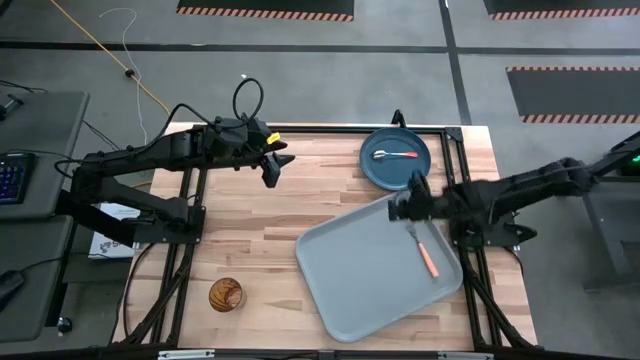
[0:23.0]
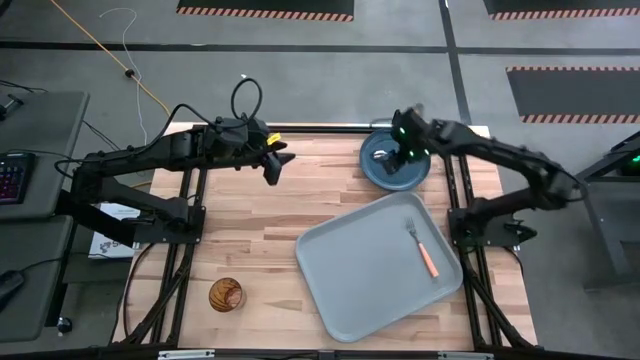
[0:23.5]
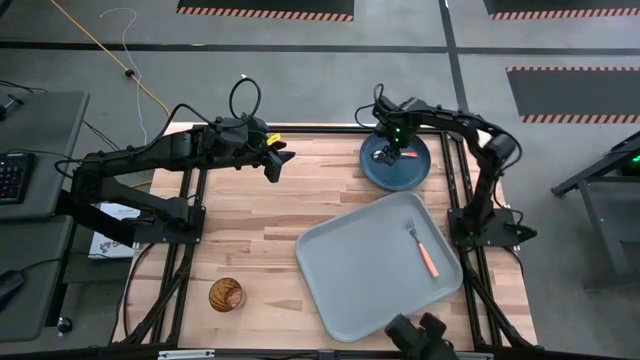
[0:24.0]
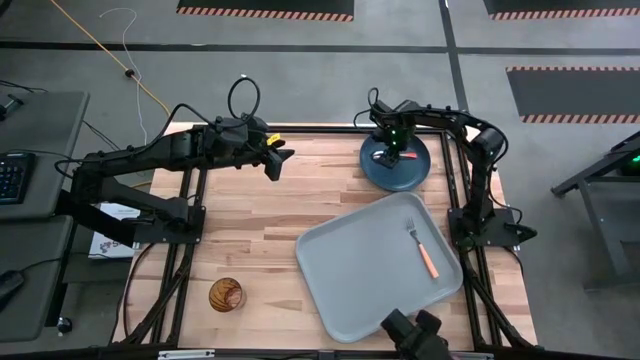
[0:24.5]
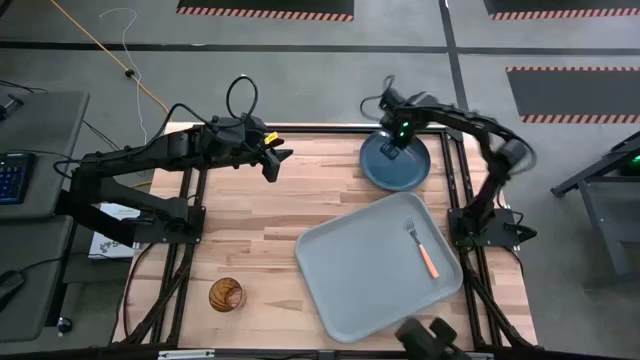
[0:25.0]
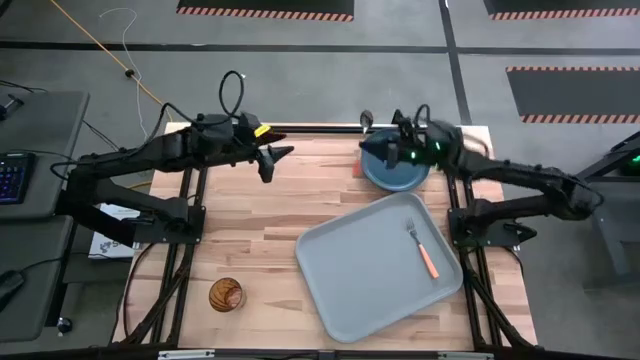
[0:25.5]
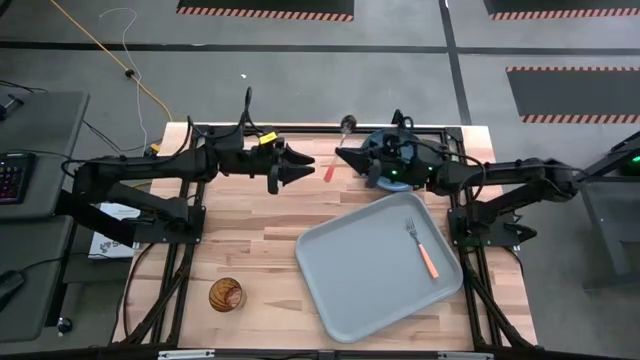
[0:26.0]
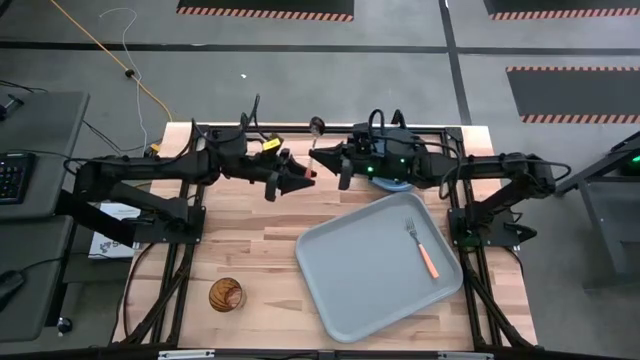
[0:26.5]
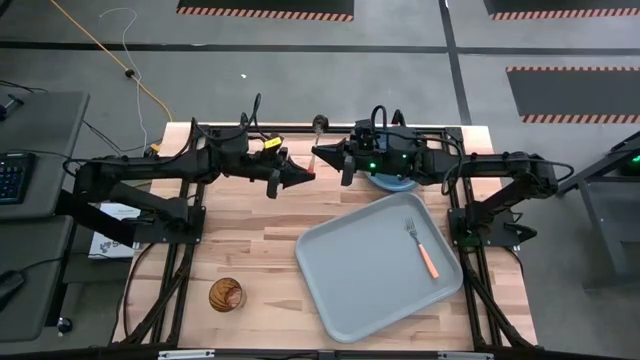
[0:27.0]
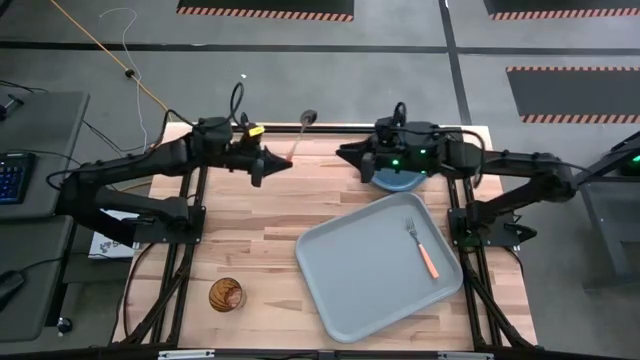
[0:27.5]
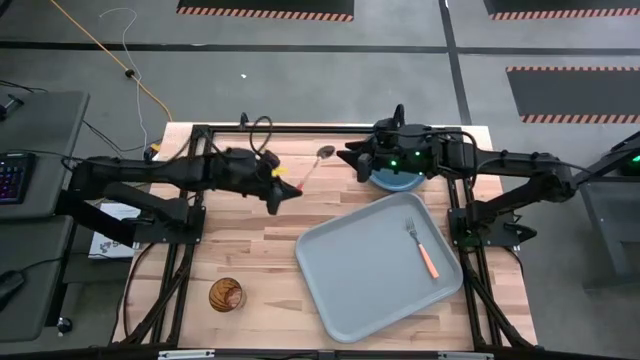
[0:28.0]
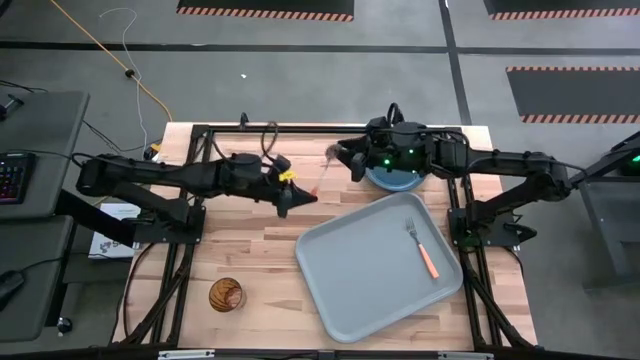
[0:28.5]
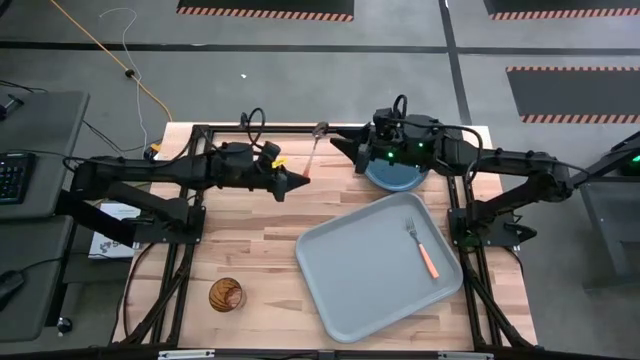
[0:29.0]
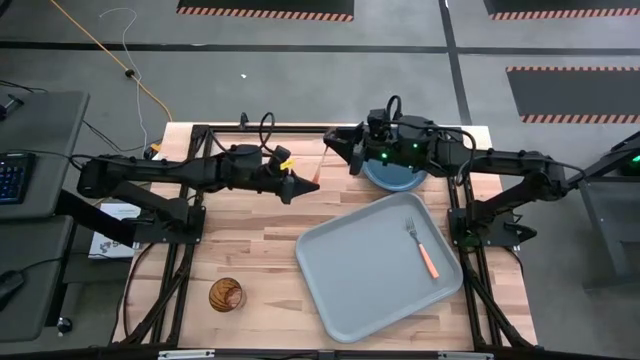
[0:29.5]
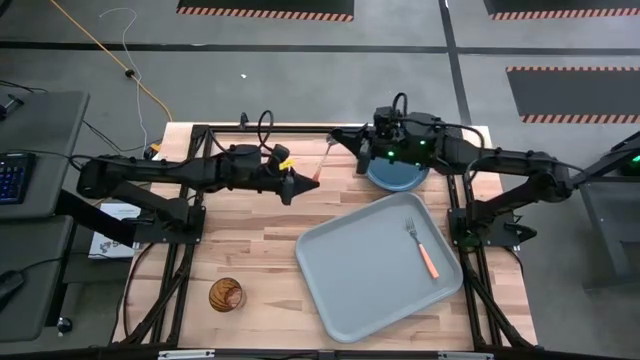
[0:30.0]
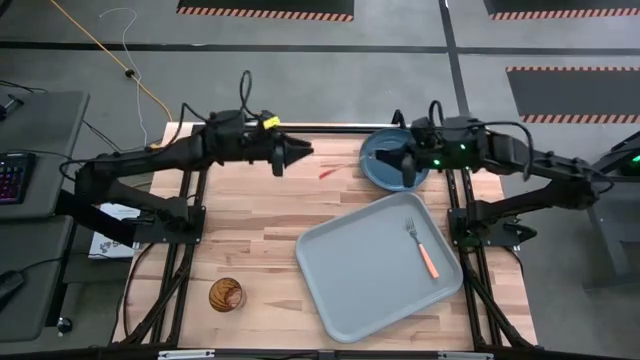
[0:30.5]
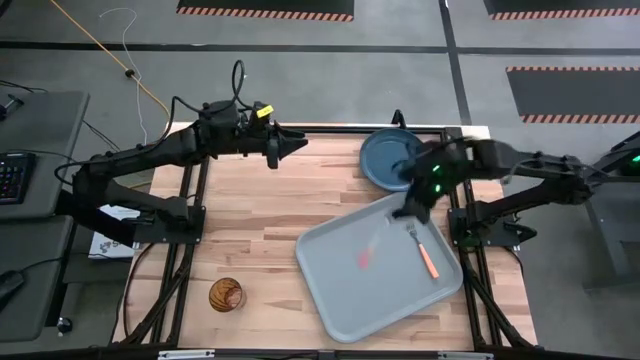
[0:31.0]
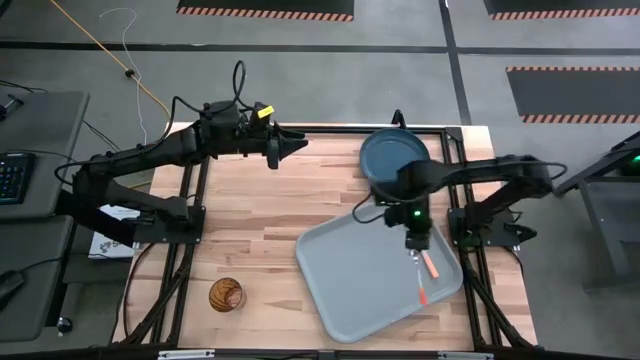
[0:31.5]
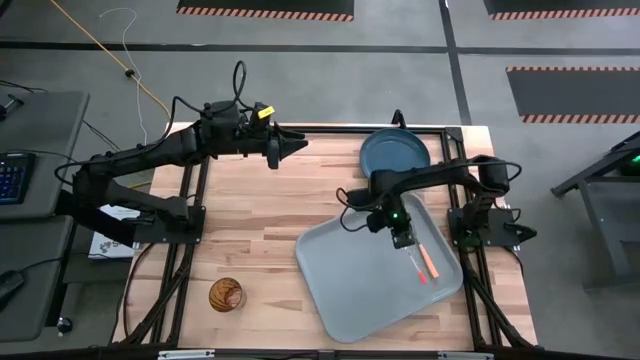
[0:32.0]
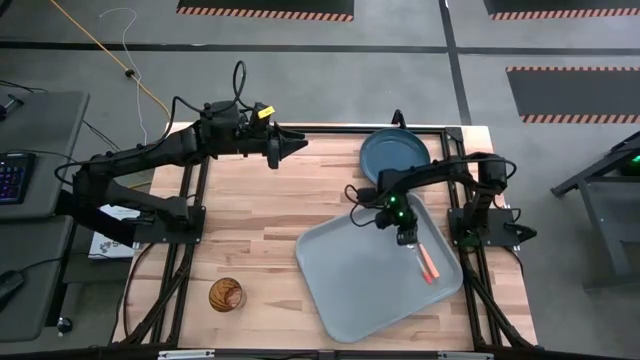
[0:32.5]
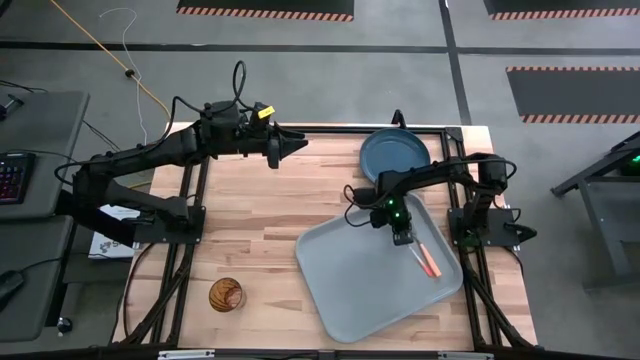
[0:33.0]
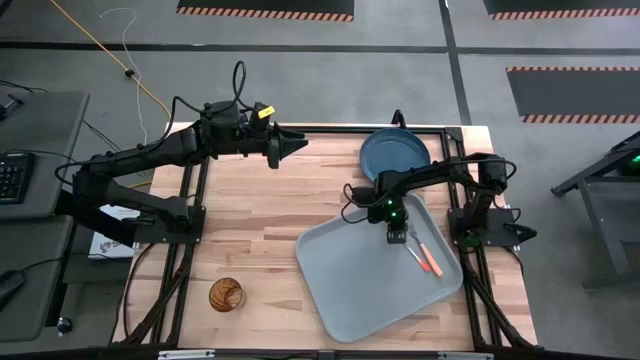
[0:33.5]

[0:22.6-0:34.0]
Task: Pick and place plate/cup/fork/spoon on tray
Put the orange spoon to the left of the light brown fork on the gray tray

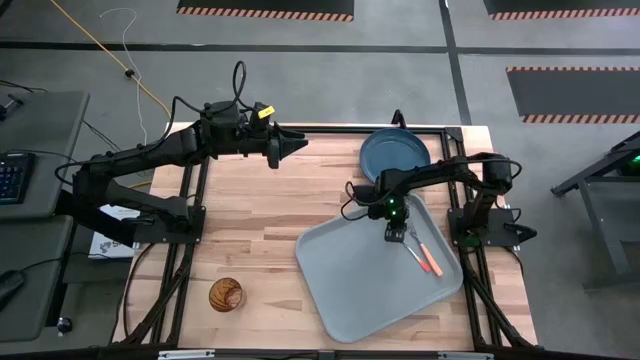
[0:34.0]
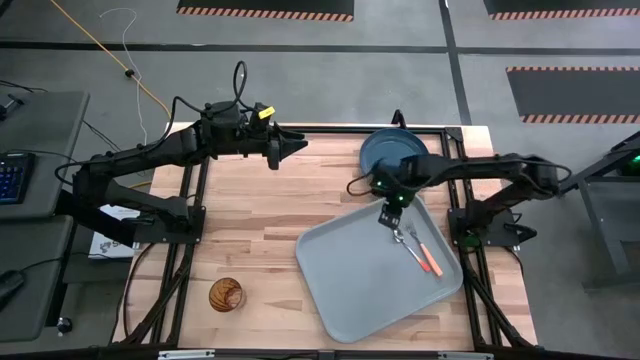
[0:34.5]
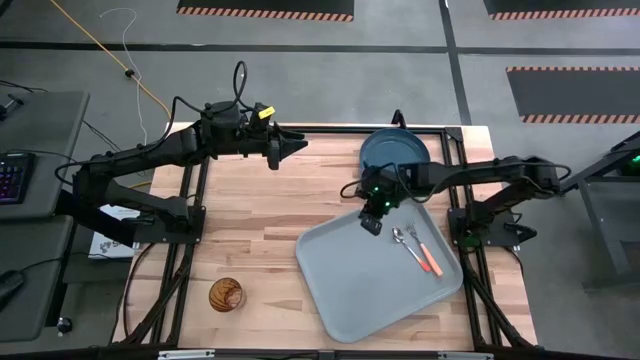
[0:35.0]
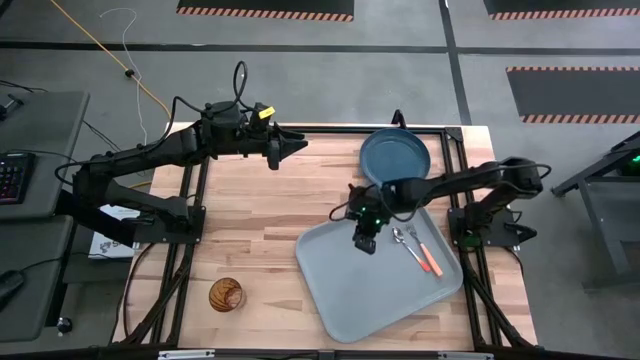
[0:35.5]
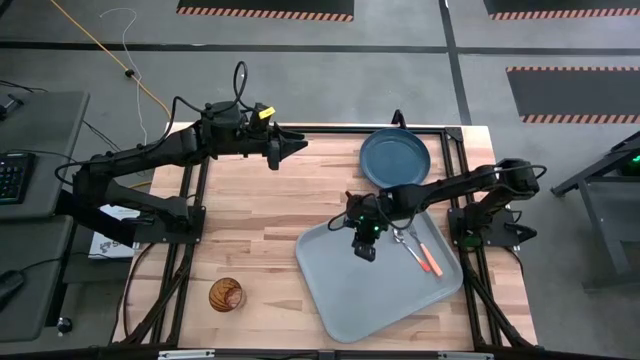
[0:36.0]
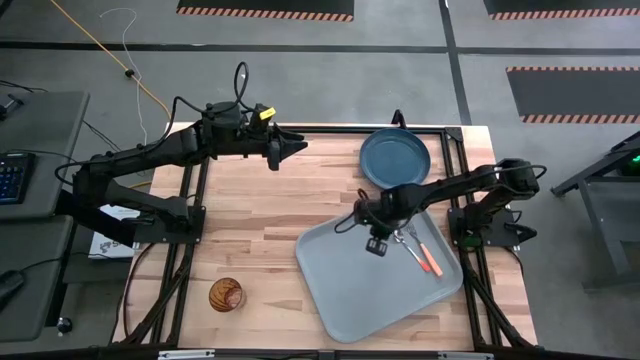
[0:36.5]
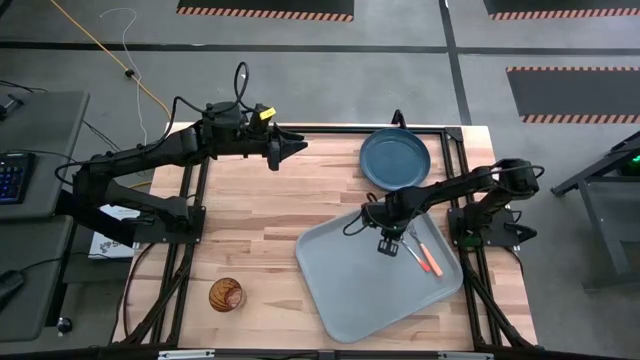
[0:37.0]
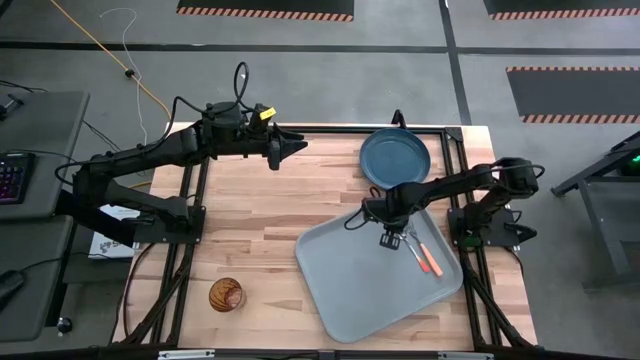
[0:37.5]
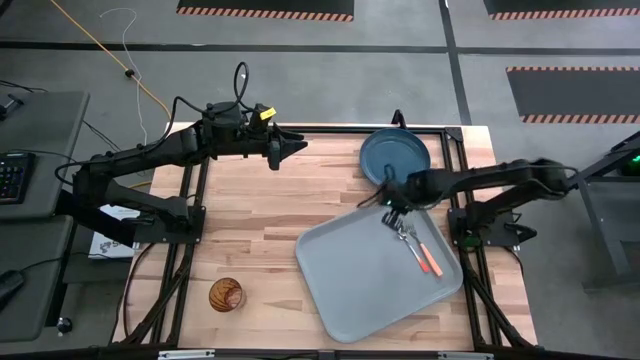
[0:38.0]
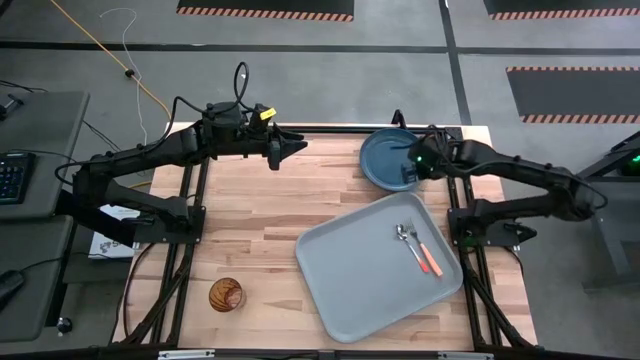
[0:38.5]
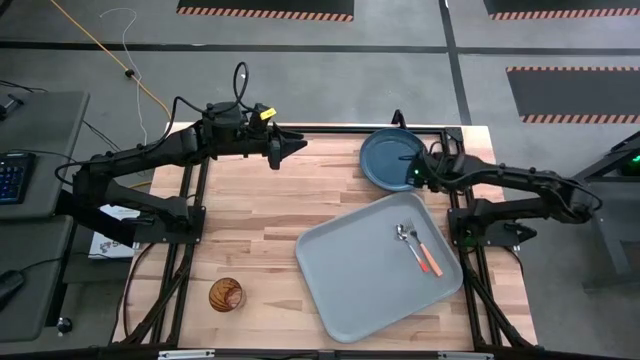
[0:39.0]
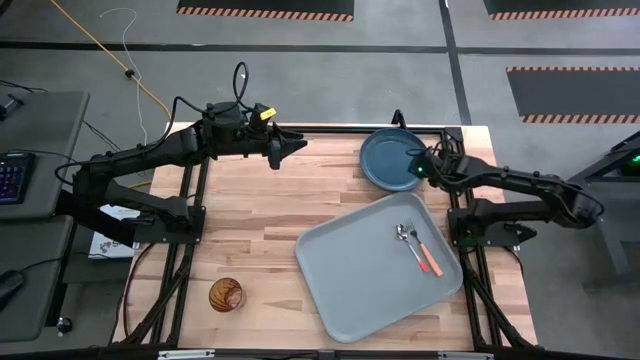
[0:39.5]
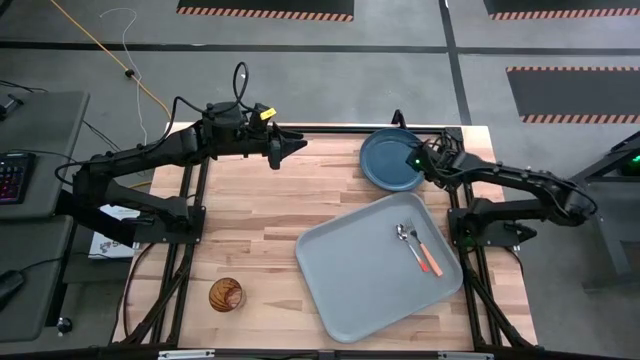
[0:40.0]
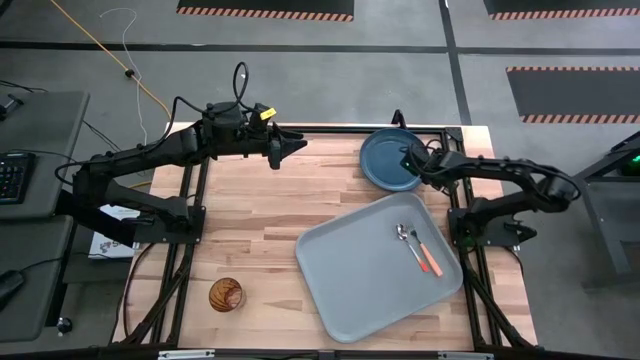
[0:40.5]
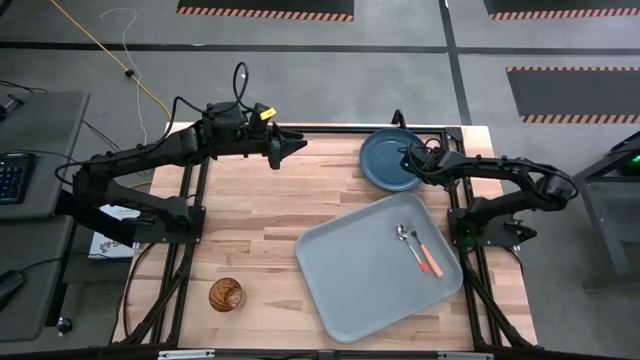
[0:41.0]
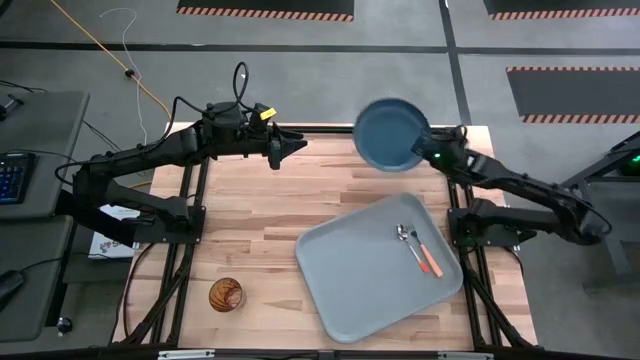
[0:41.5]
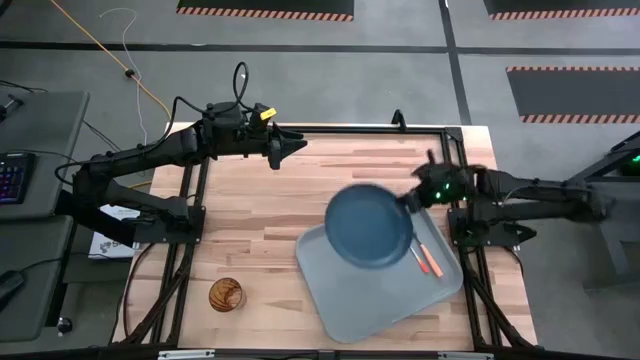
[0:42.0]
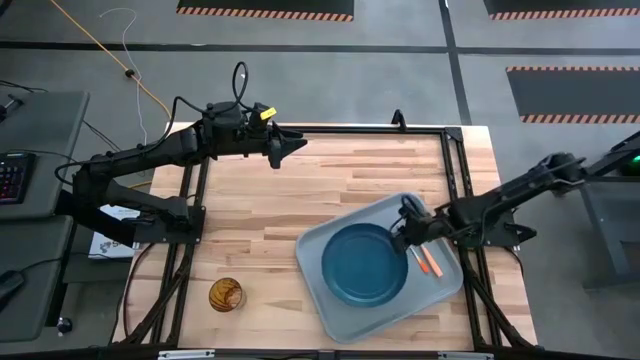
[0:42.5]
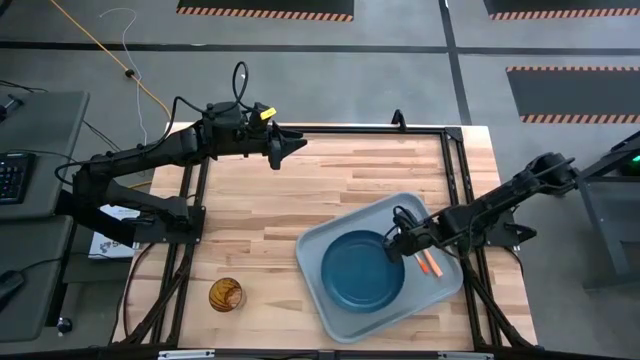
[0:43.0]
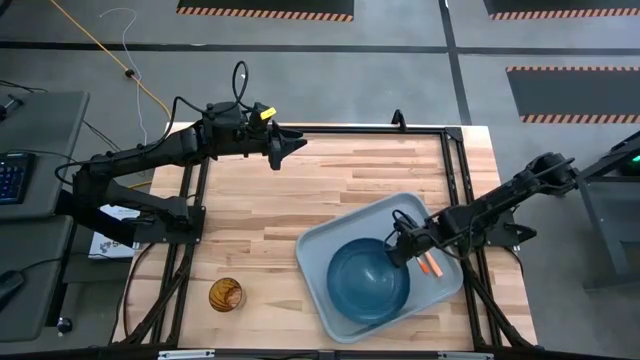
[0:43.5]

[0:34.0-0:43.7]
Put the blue plate on the gray tray
